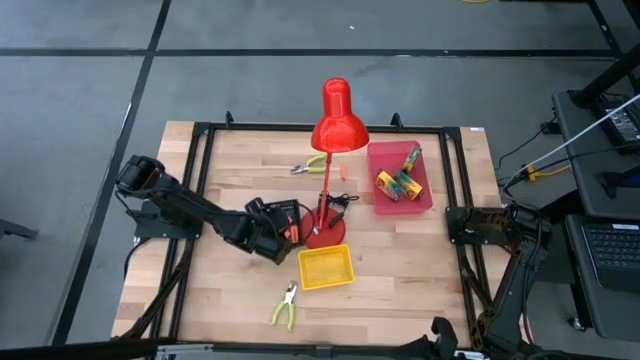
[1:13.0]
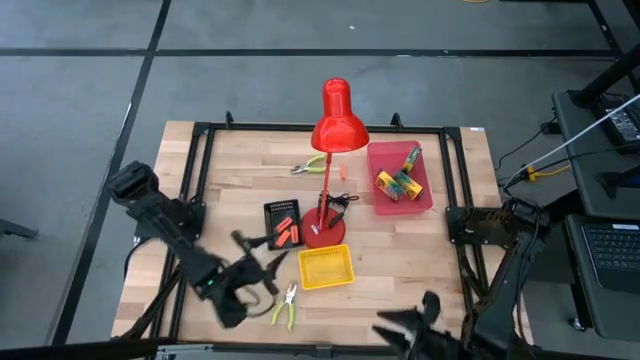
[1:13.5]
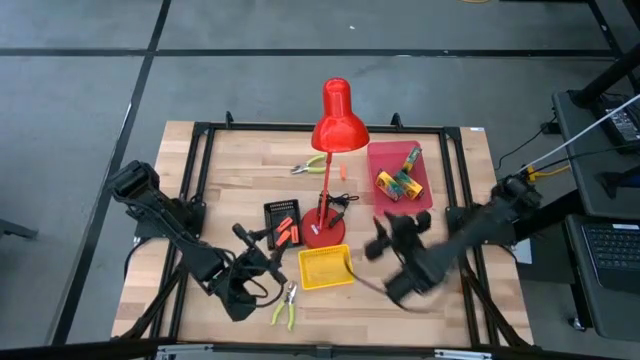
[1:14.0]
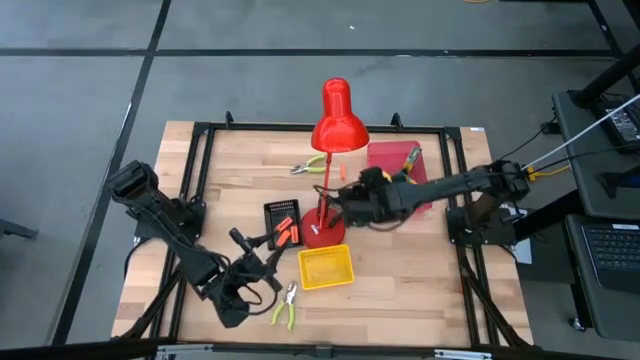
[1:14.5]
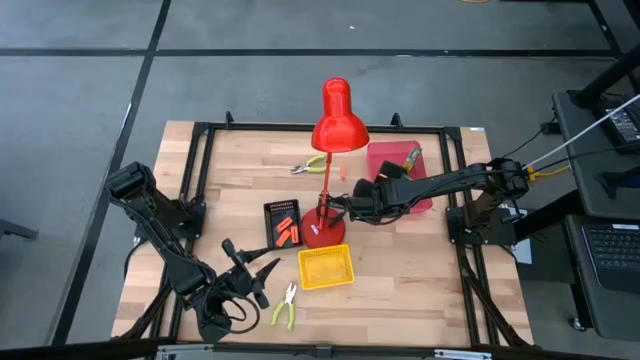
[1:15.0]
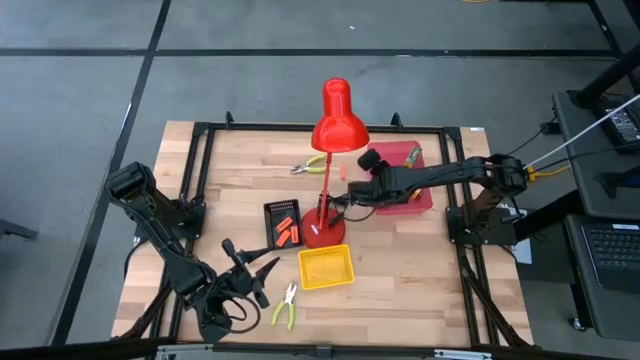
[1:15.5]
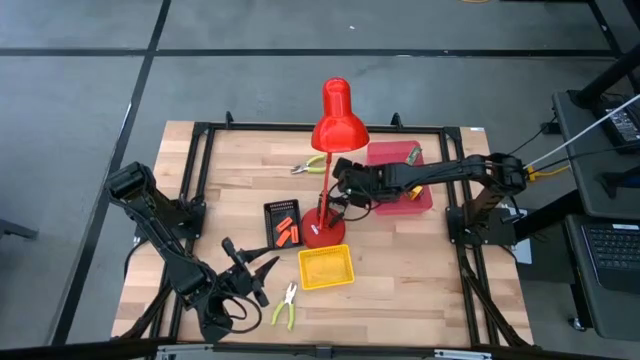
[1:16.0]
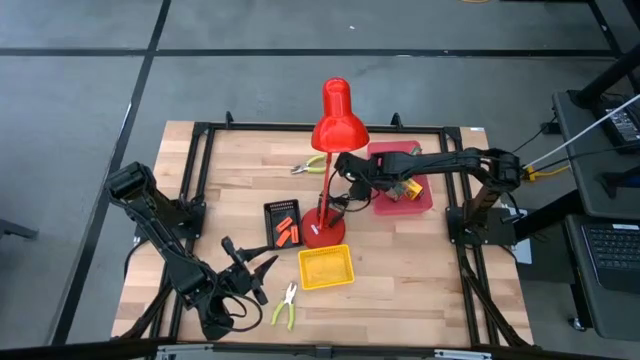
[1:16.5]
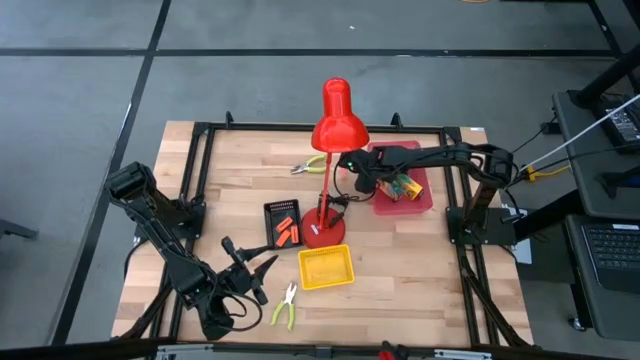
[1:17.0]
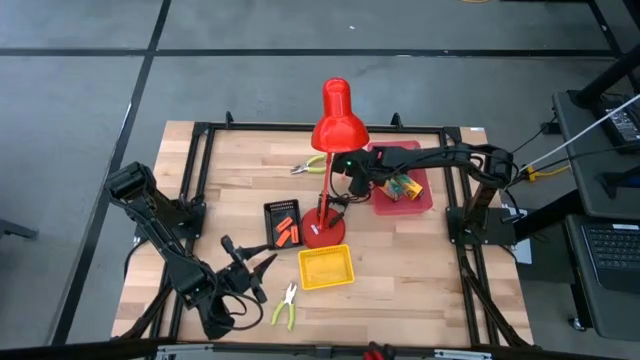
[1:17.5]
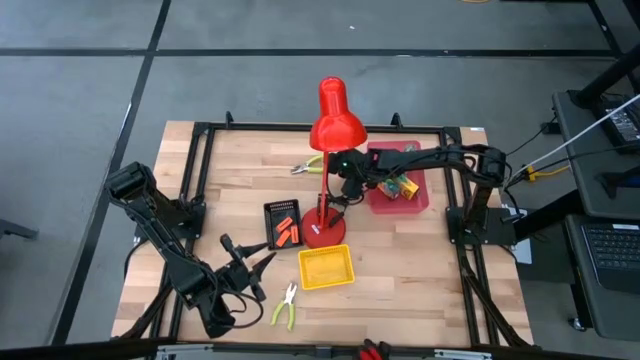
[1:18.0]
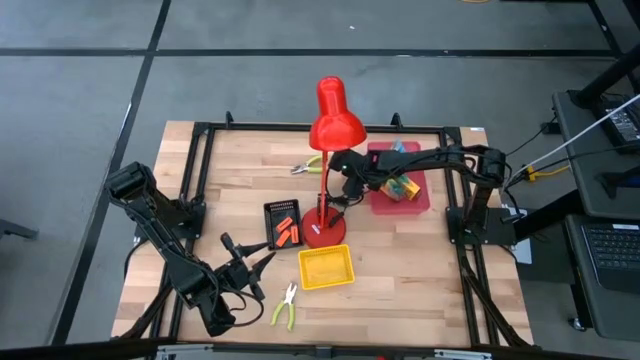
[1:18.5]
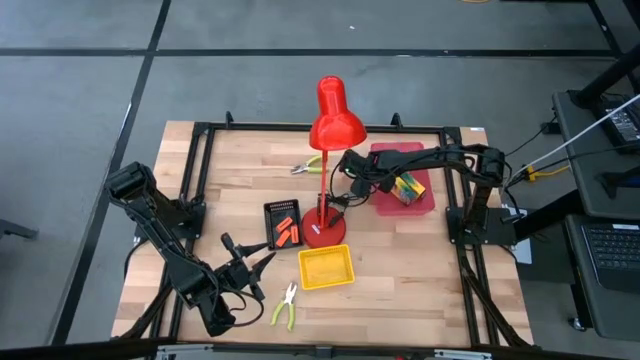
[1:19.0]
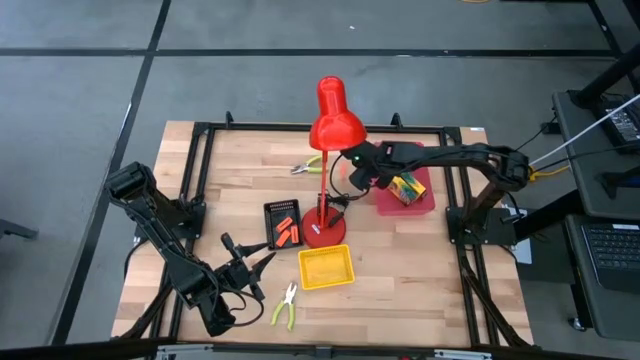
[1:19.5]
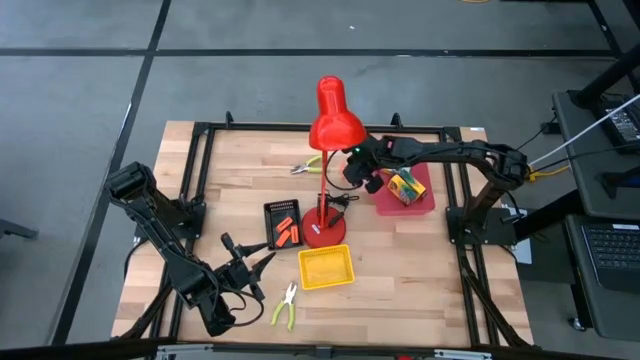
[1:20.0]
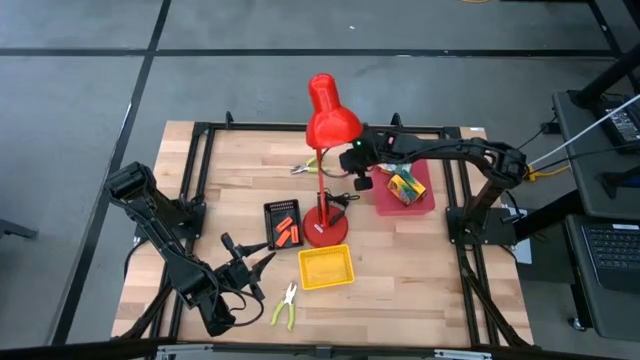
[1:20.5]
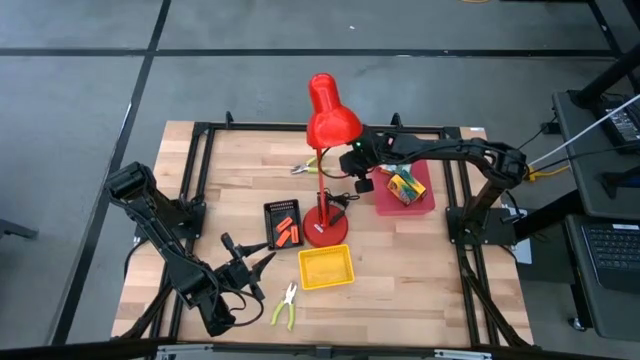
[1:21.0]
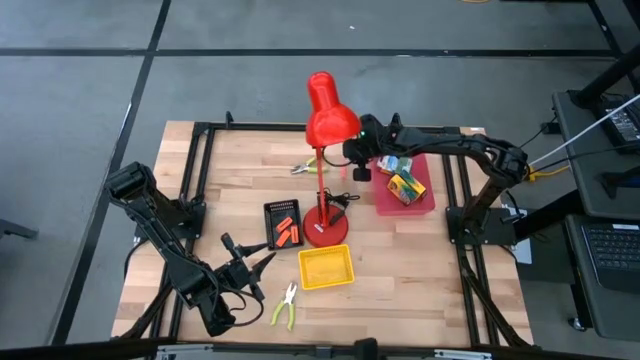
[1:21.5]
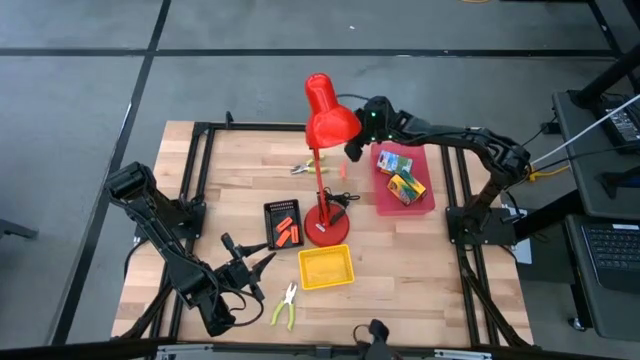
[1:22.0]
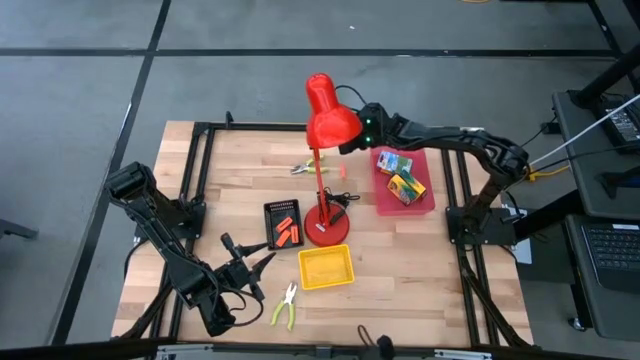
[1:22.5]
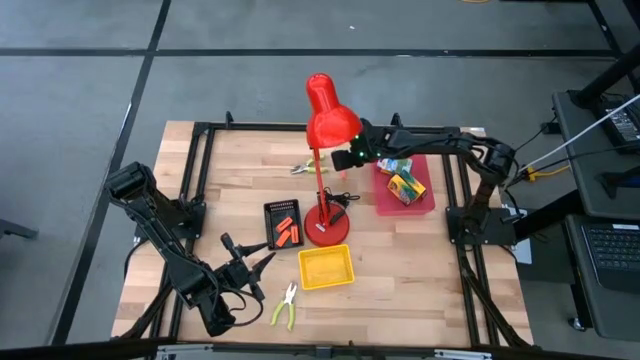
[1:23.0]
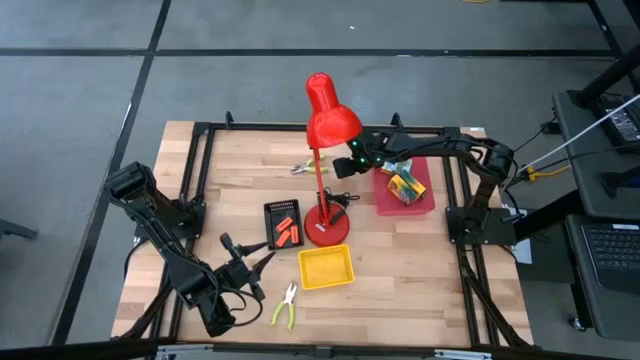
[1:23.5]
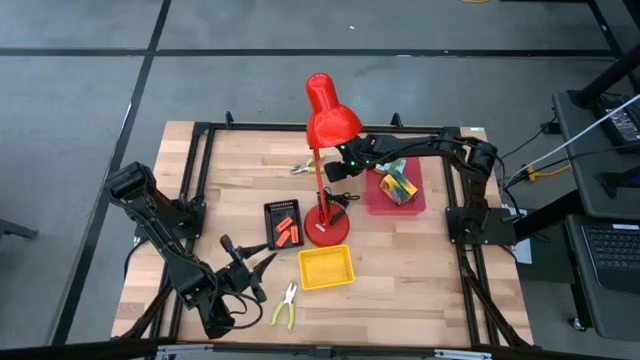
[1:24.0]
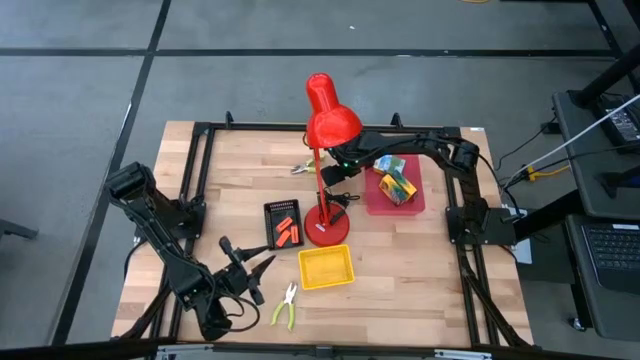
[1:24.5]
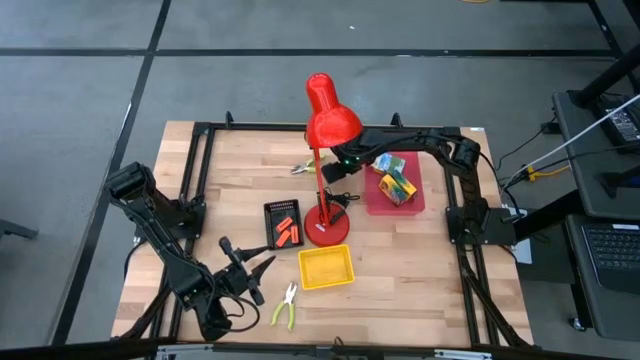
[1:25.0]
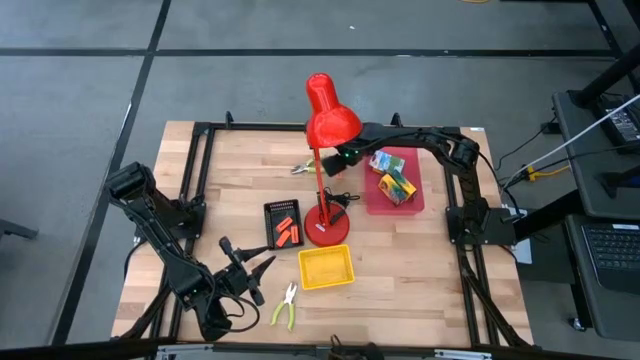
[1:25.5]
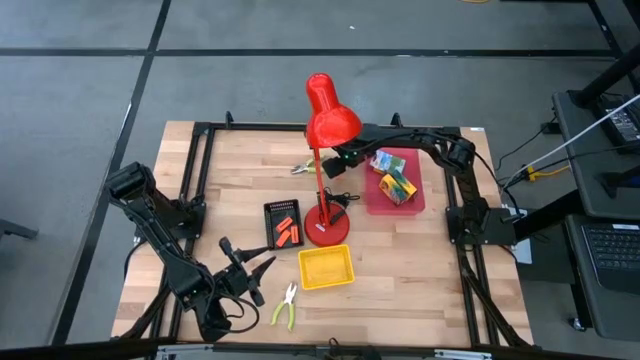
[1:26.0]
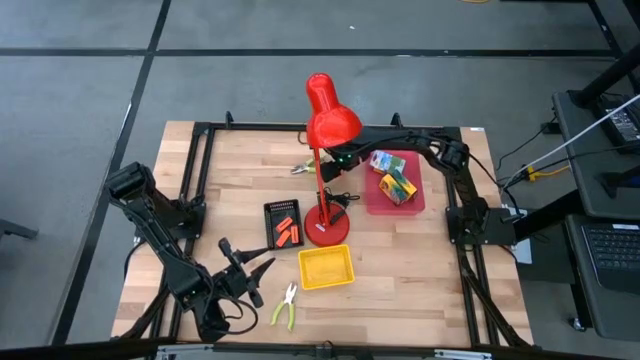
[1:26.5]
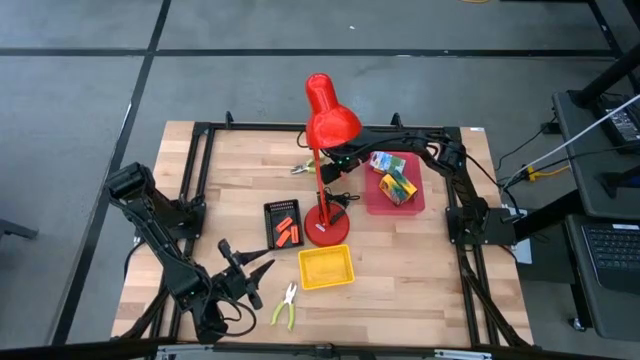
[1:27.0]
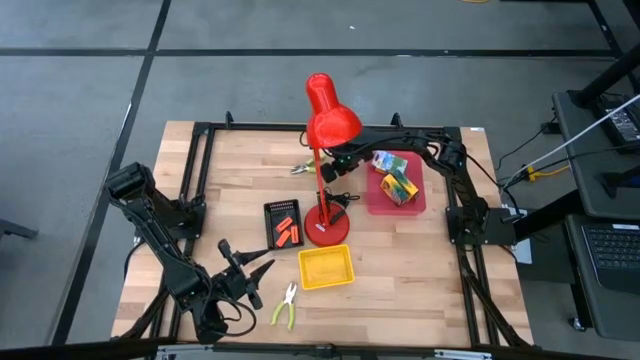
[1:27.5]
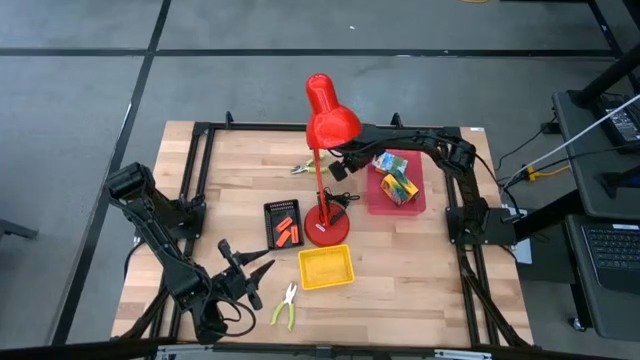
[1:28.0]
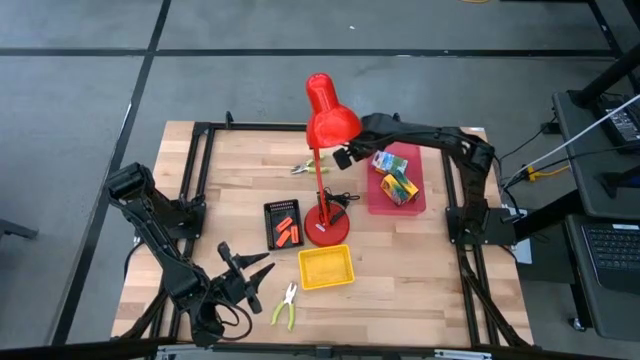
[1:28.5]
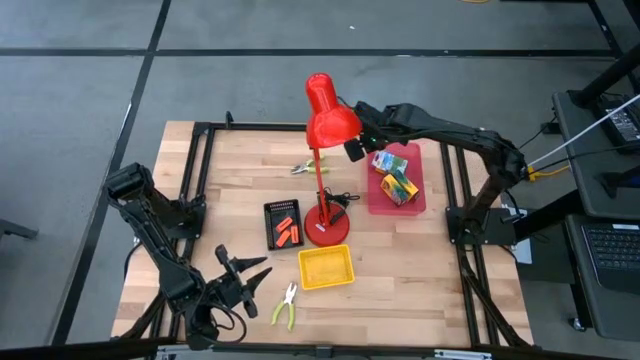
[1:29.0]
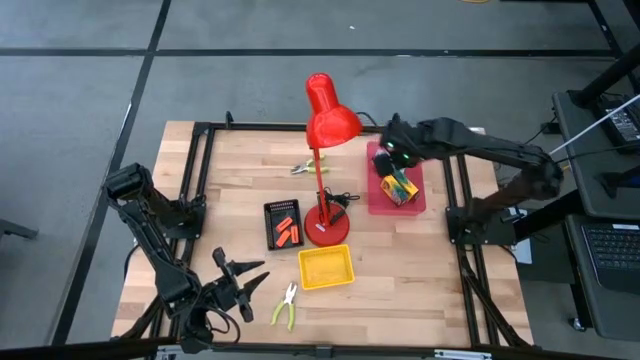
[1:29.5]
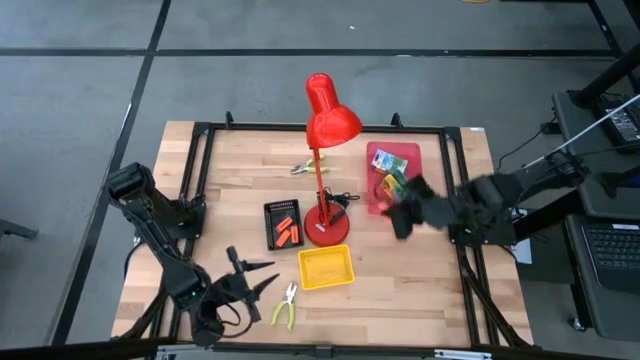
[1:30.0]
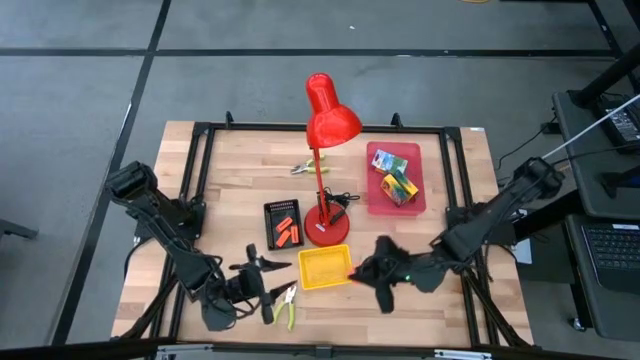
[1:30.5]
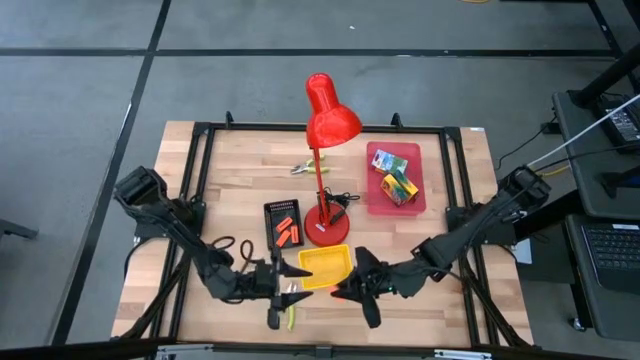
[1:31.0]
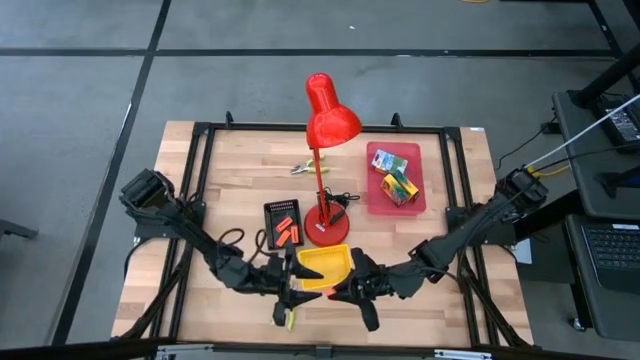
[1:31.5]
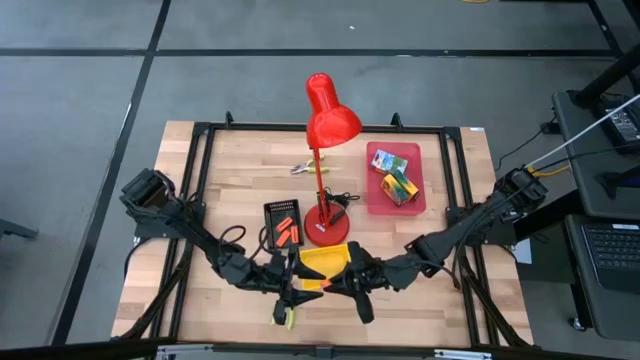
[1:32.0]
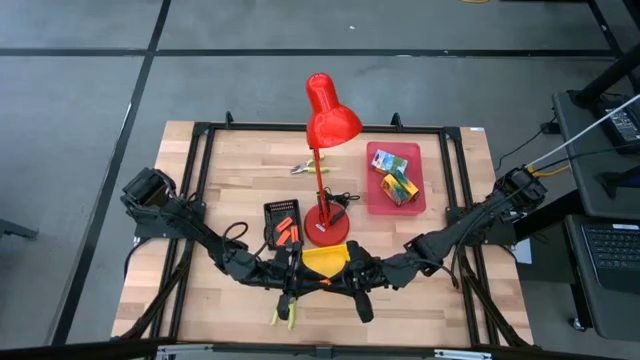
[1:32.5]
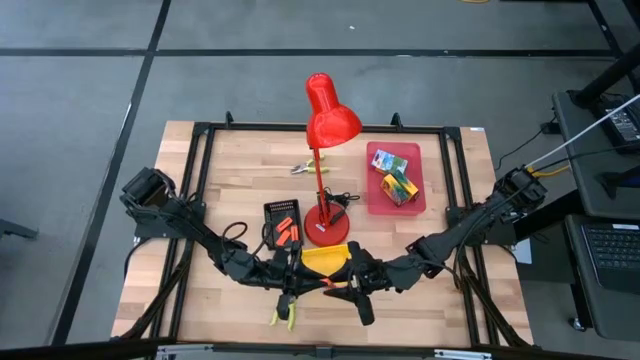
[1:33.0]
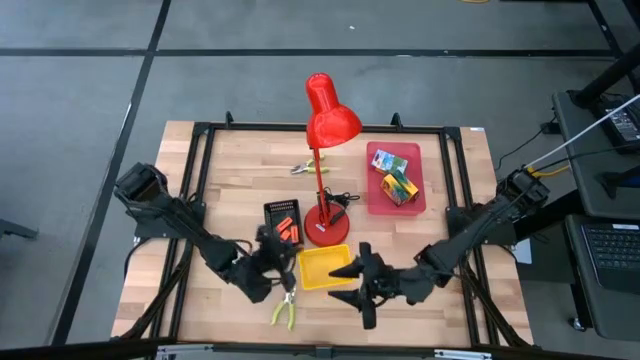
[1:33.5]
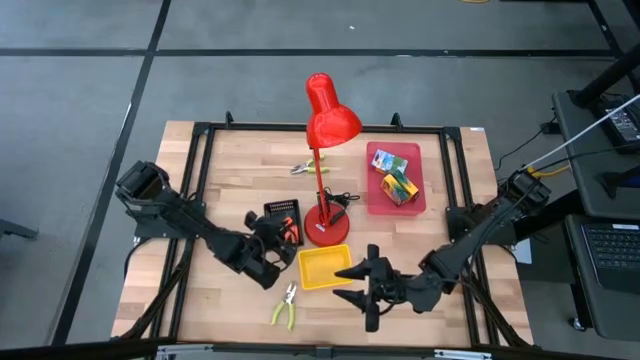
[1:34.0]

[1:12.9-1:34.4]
Task: Pick & Place School Supplies
Put the orange eraser into the black bin
